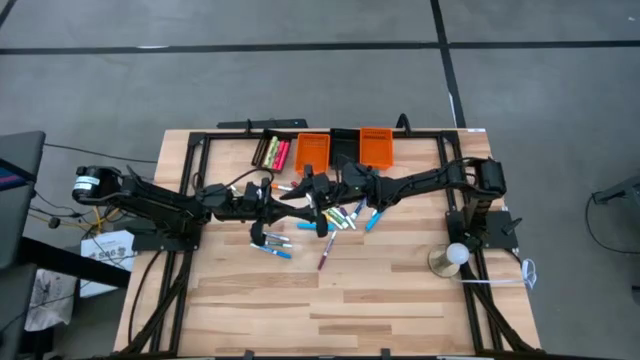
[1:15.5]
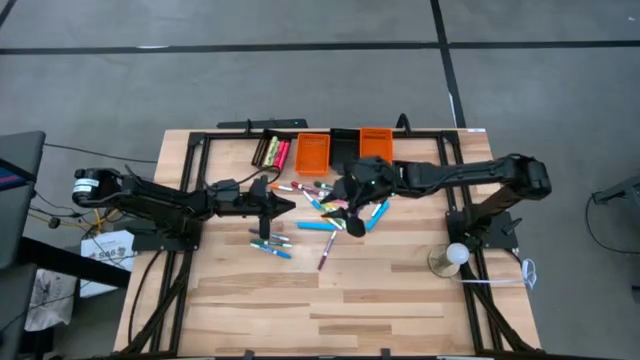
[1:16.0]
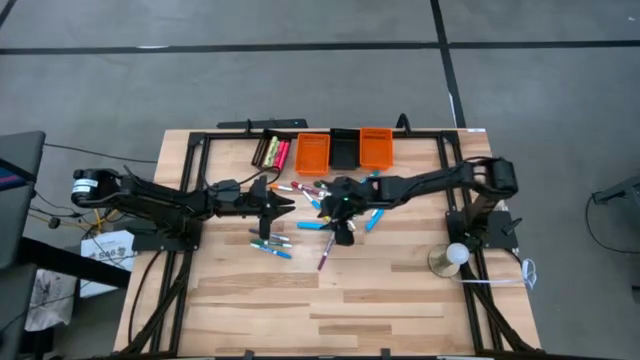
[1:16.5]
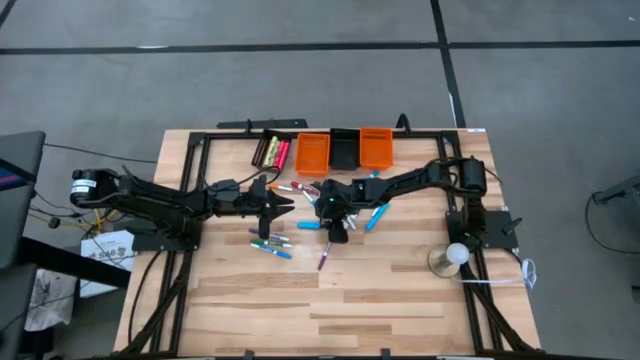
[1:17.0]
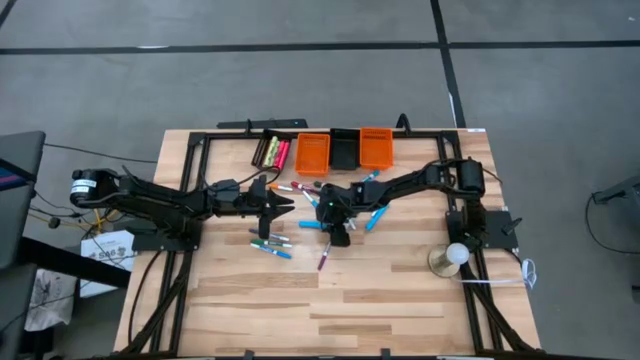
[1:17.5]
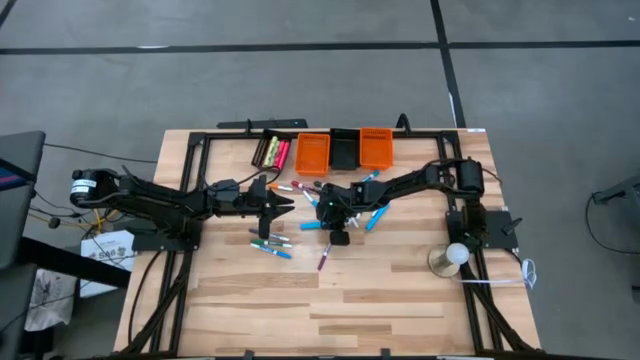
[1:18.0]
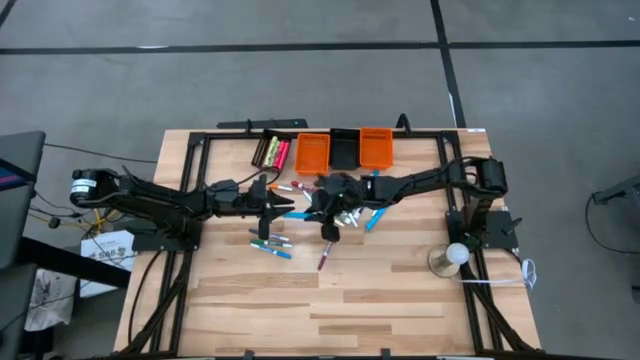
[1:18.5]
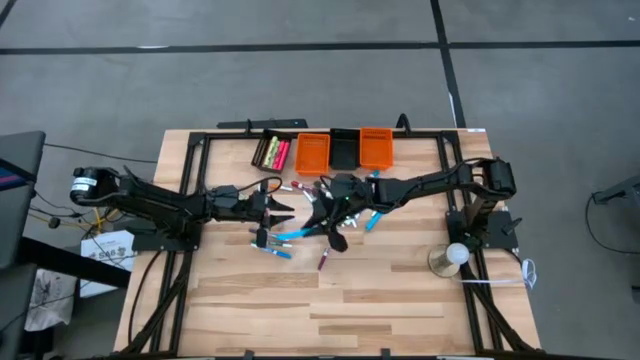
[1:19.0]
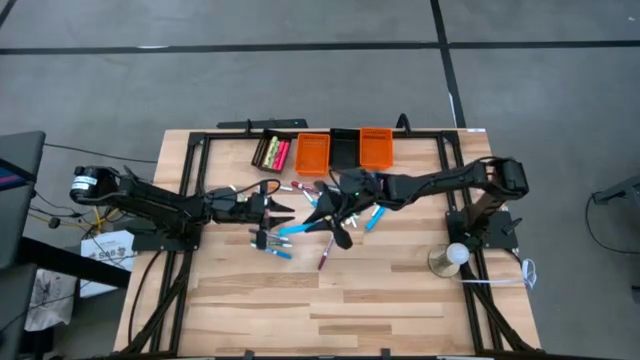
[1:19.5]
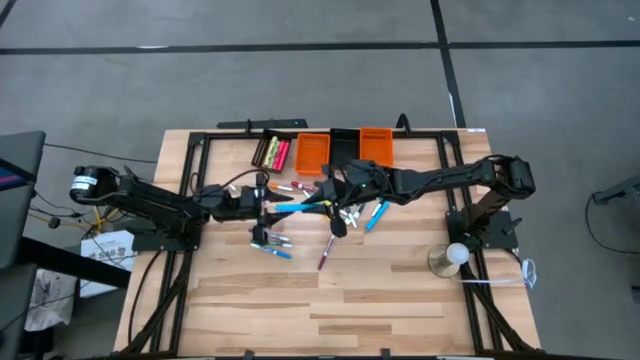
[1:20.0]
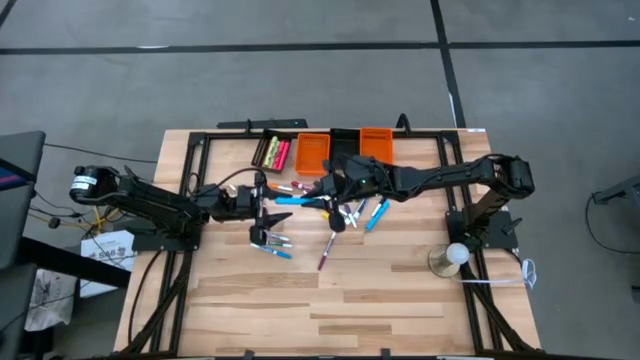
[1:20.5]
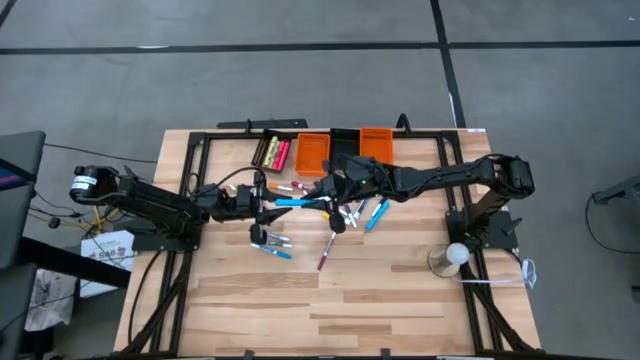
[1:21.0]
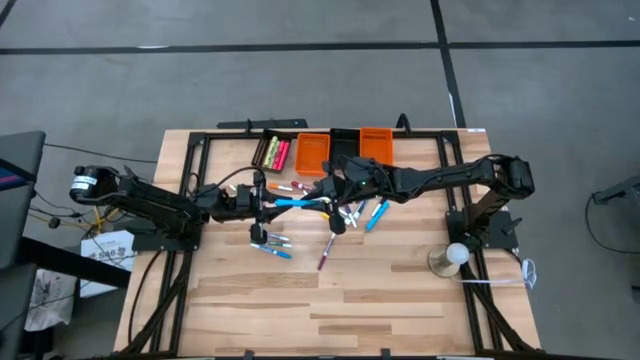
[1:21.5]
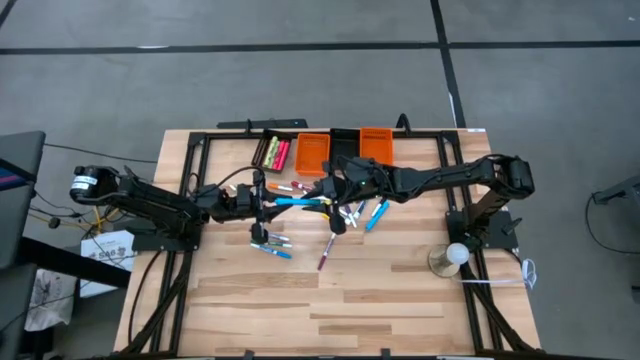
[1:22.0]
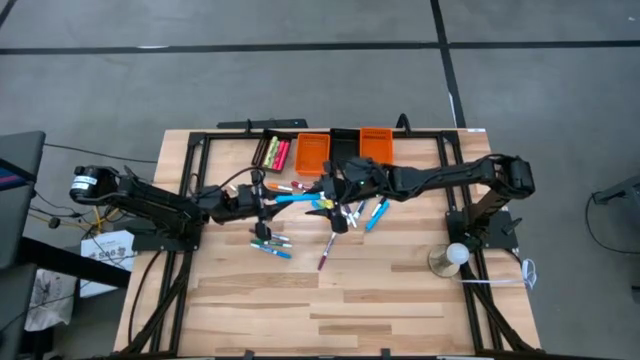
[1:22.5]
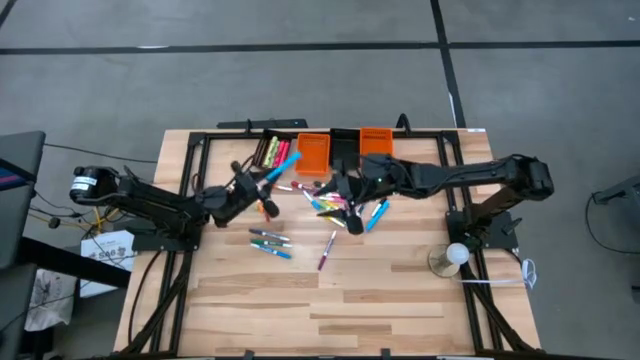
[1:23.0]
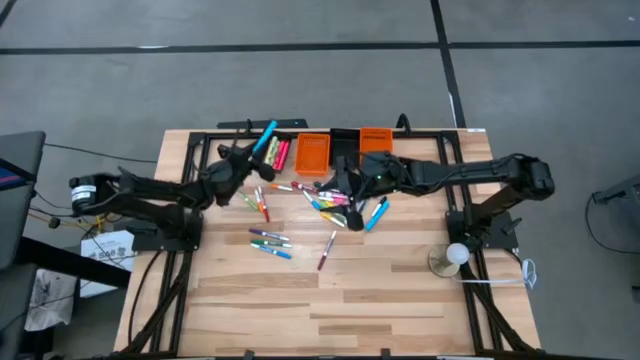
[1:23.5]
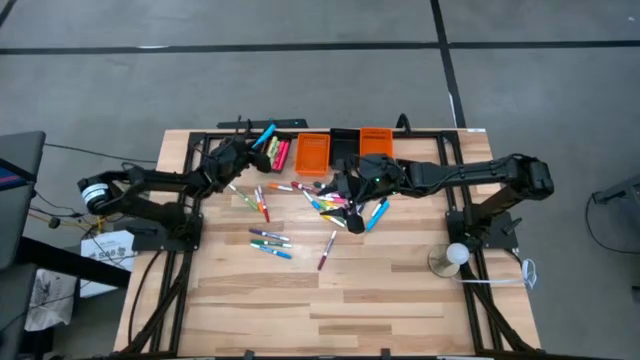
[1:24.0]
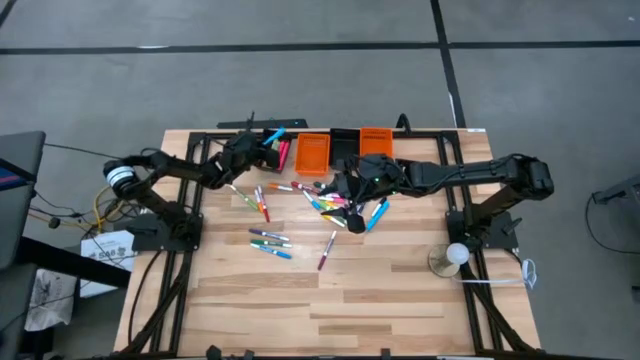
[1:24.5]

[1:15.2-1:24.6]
Task: Pick & Place Markers
Put the left big blue highlighter pen into the left black basket

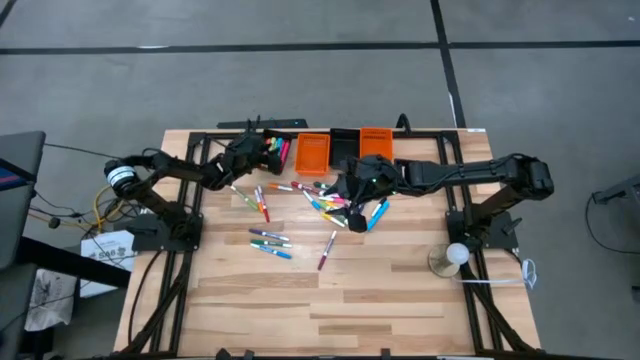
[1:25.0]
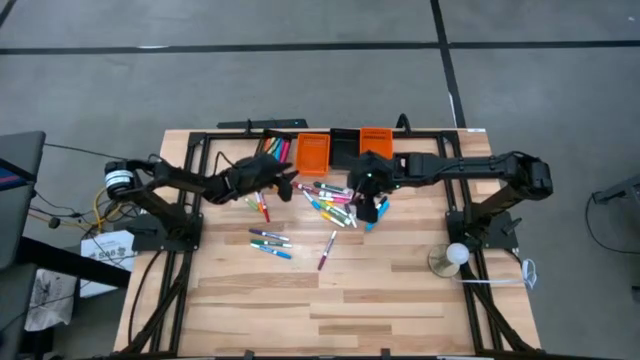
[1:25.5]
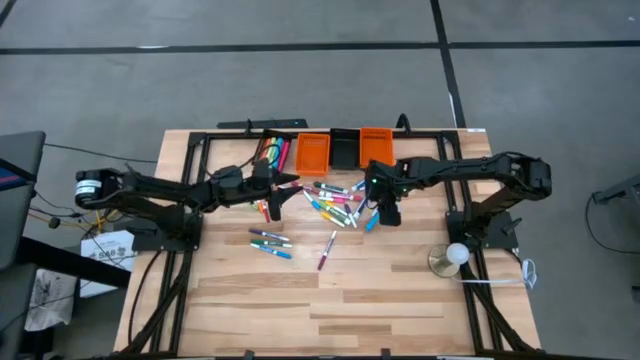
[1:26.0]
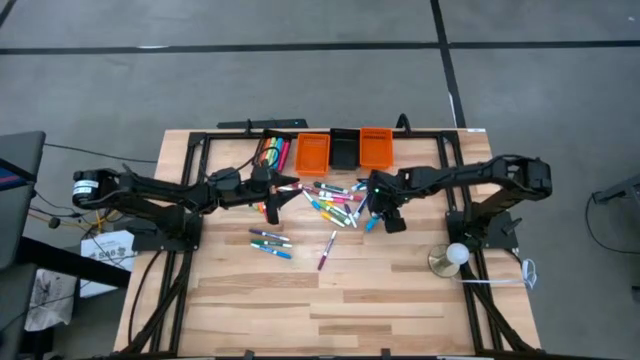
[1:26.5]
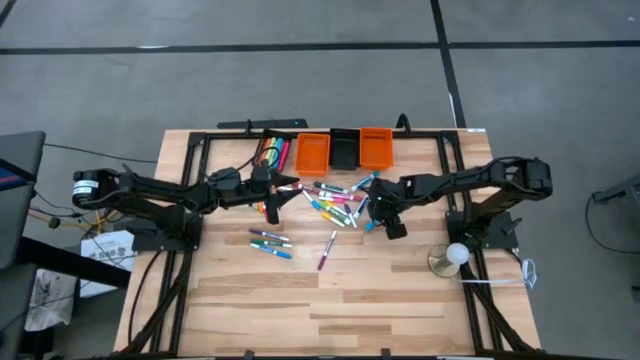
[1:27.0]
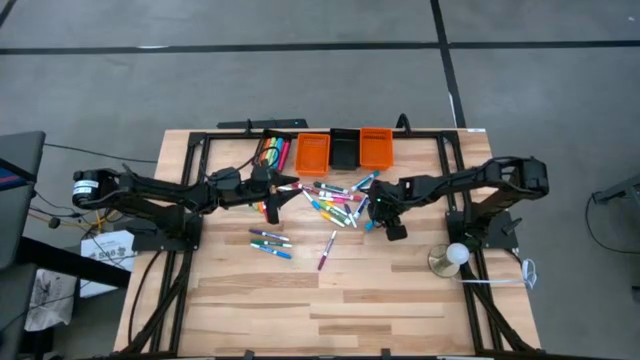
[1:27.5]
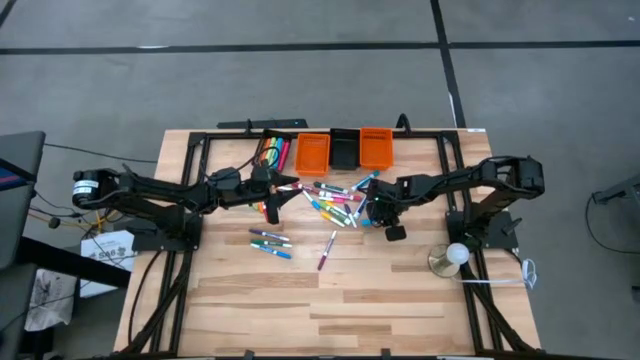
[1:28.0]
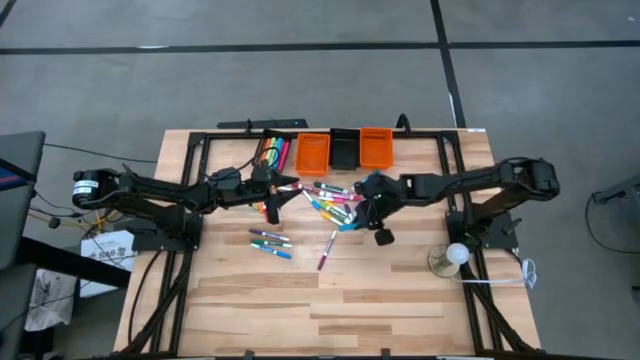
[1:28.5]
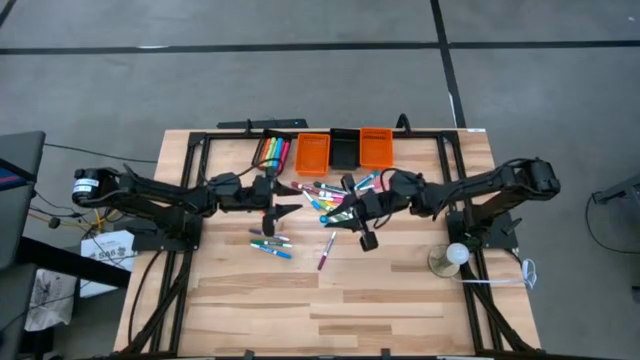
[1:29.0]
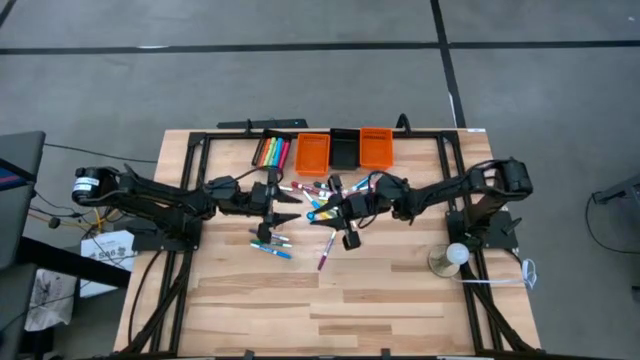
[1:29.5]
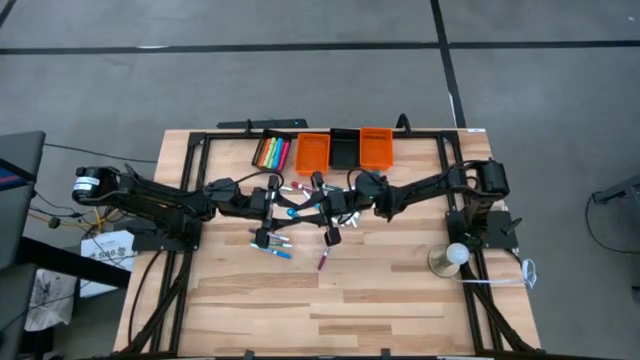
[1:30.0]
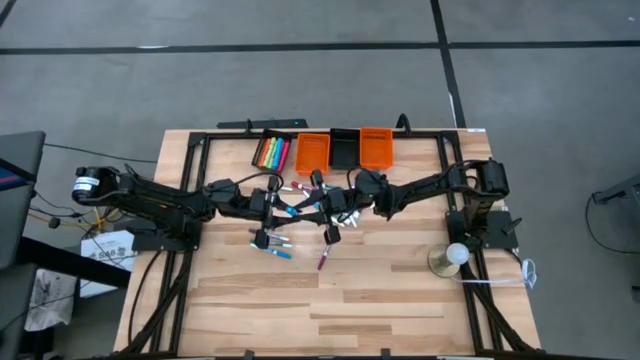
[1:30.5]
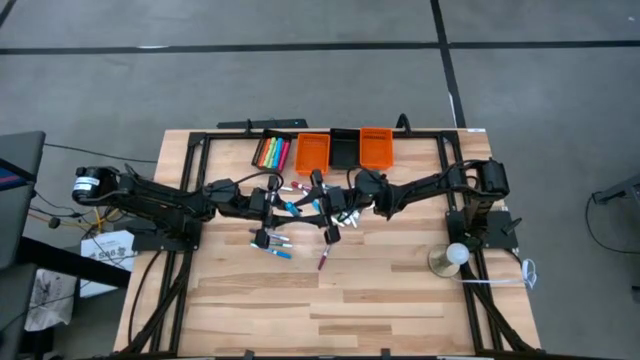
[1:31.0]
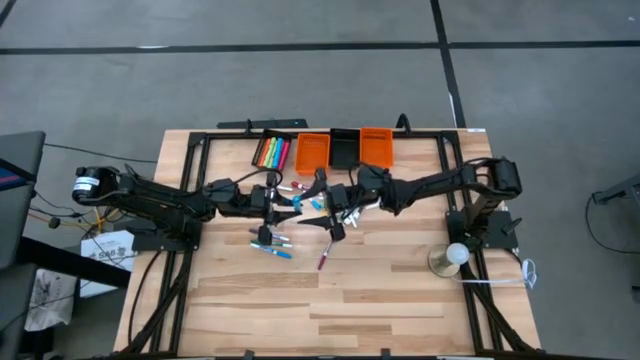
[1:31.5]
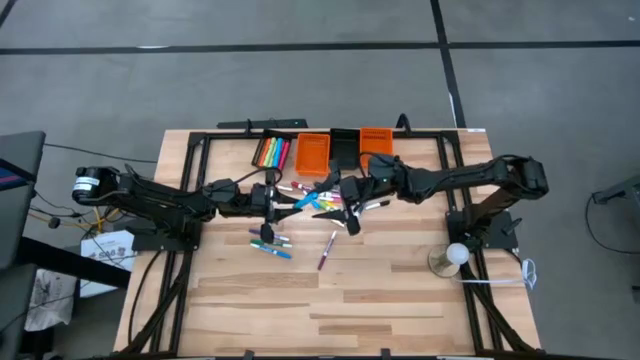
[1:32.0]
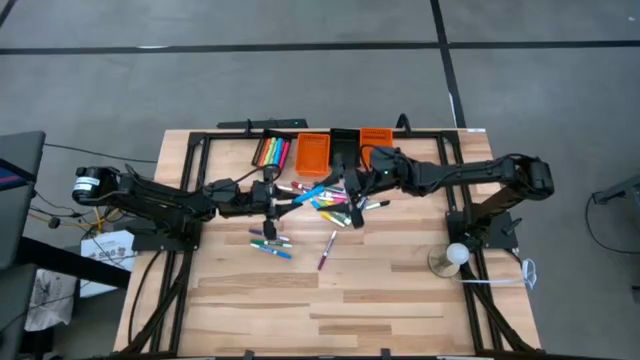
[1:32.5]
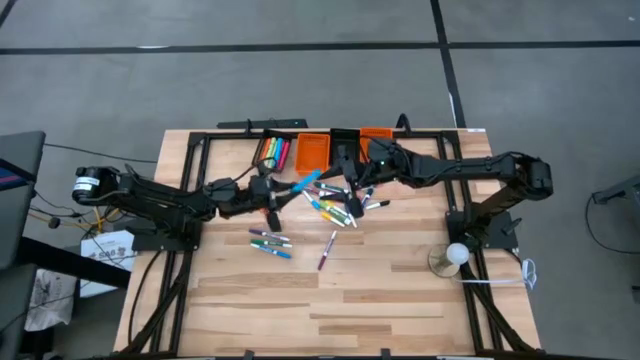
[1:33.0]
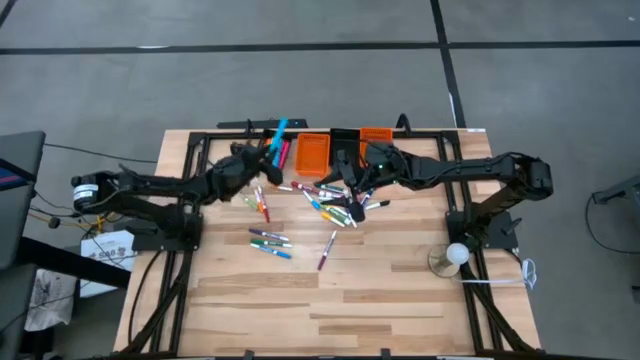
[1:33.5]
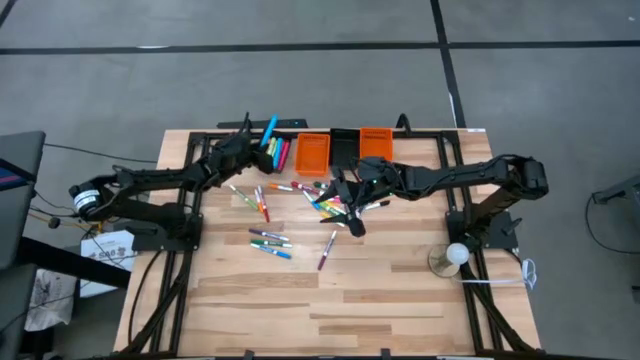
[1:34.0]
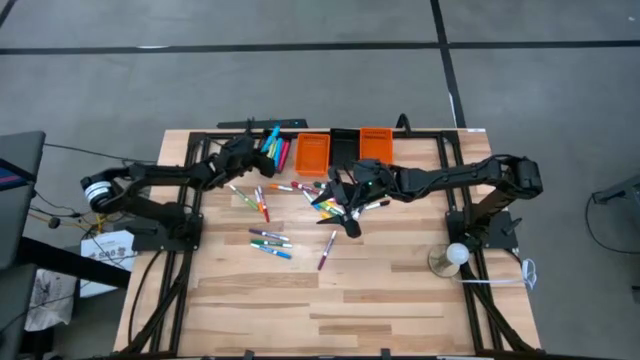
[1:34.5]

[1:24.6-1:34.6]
Put the big blue highlighter pen into the left black basket

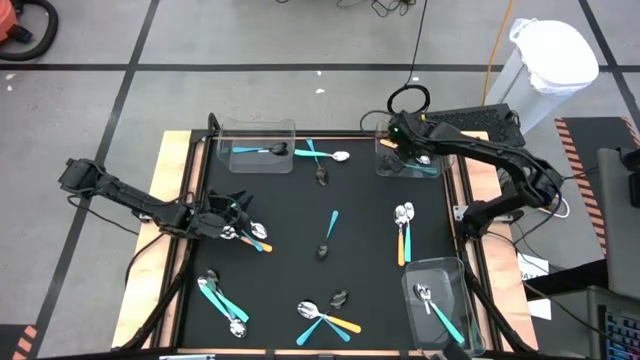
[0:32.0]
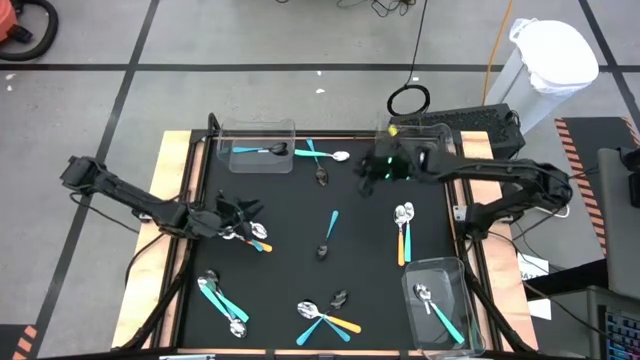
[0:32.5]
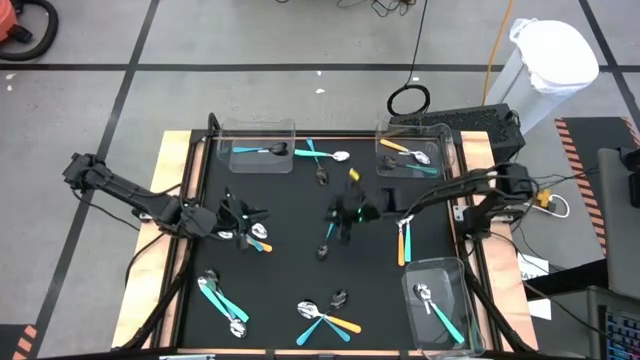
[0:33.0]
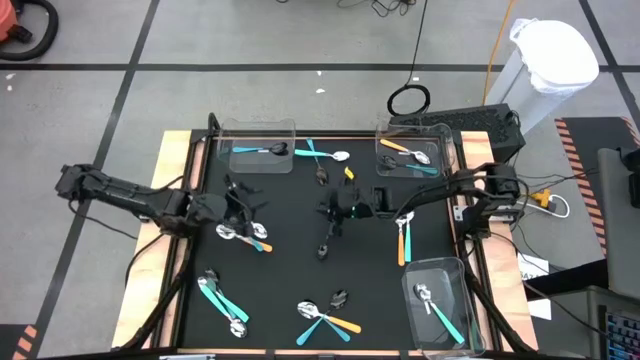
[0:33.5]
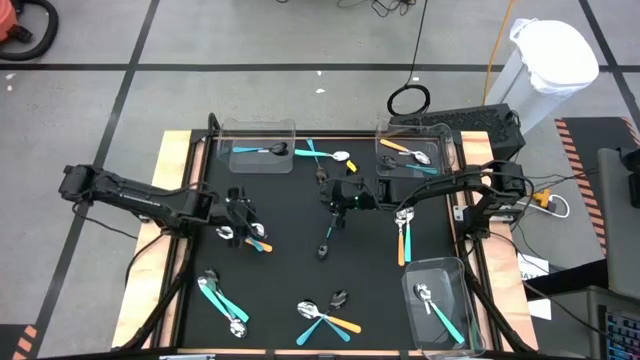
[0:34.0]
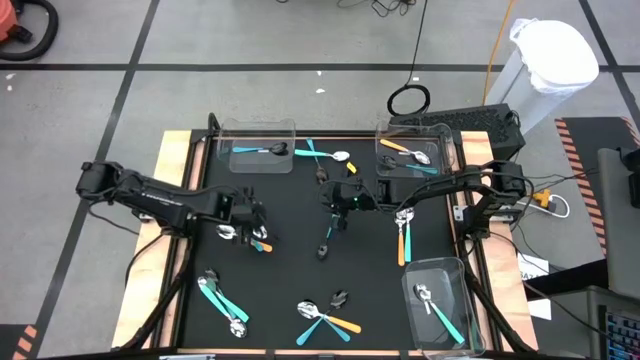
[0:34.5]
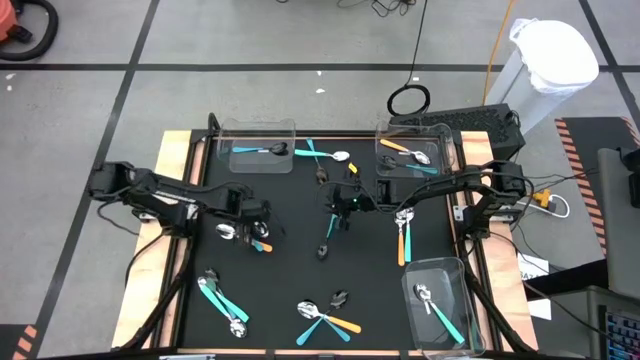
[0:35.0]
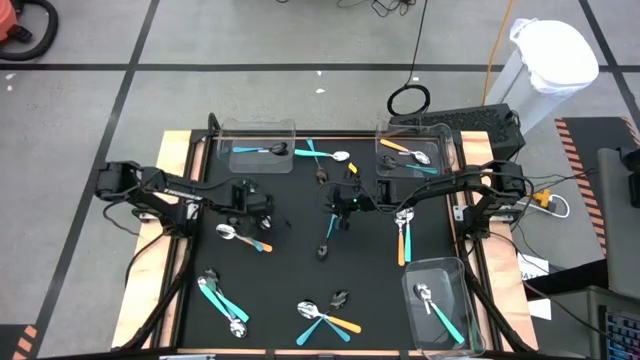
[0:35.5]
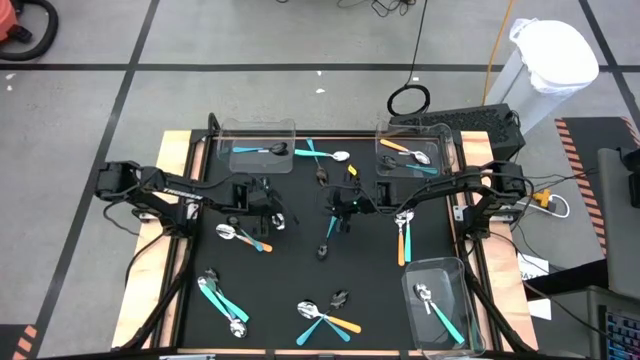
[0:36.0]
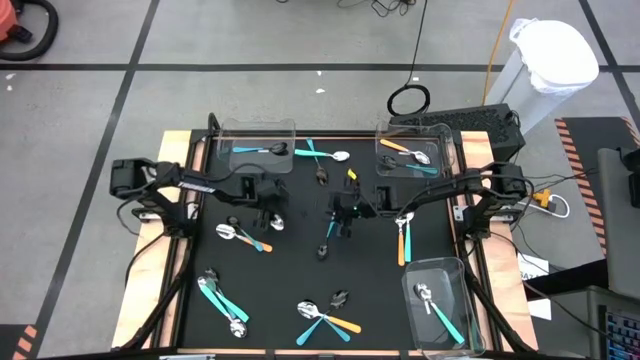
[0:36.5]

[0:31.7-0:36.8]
Task: Sort silverware by color (type)
Put the light blue spoon into the top left transparent bin
